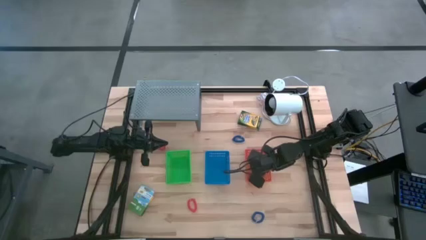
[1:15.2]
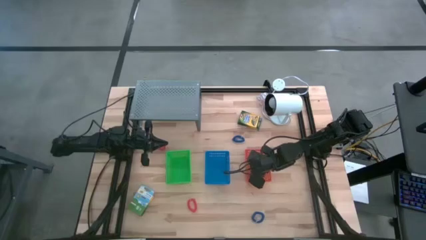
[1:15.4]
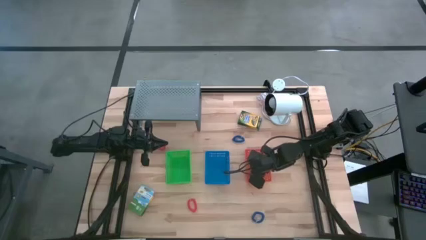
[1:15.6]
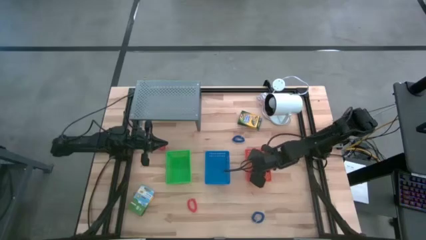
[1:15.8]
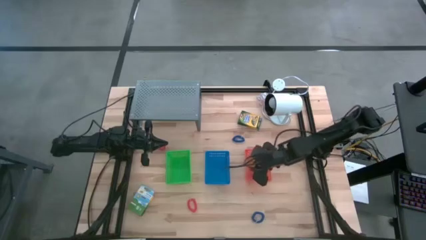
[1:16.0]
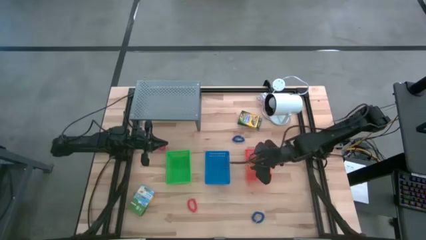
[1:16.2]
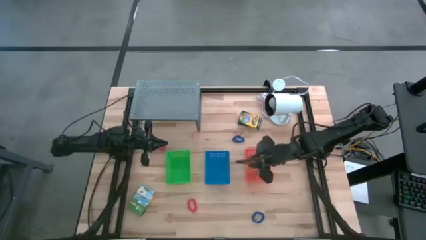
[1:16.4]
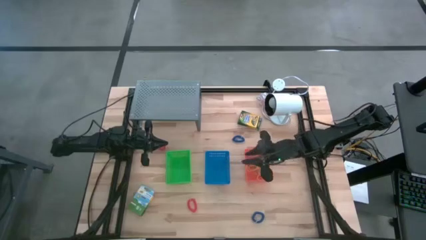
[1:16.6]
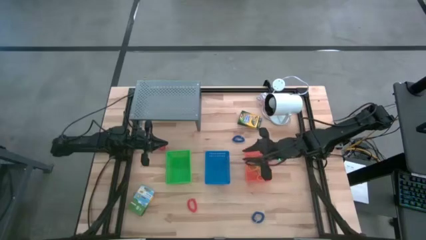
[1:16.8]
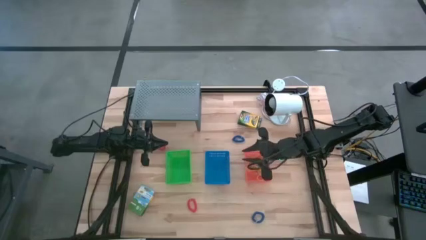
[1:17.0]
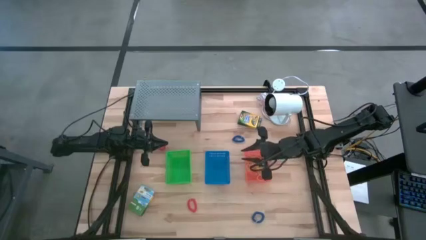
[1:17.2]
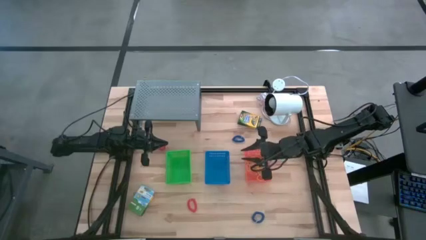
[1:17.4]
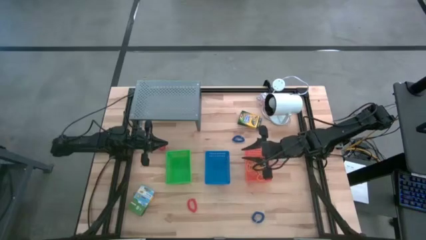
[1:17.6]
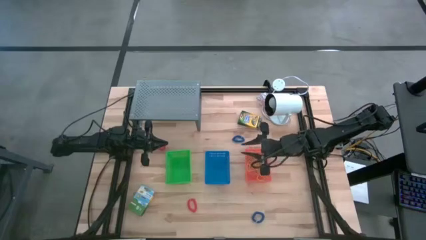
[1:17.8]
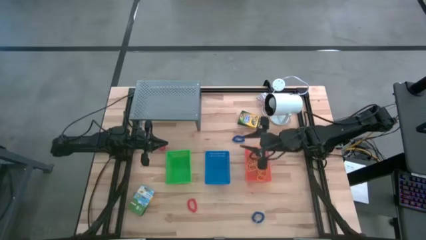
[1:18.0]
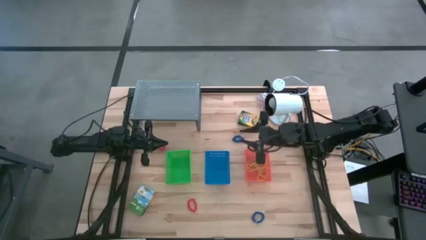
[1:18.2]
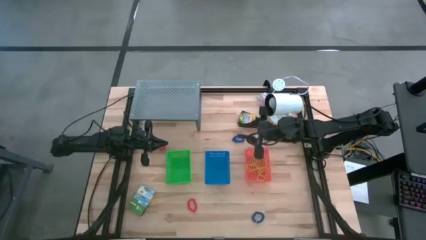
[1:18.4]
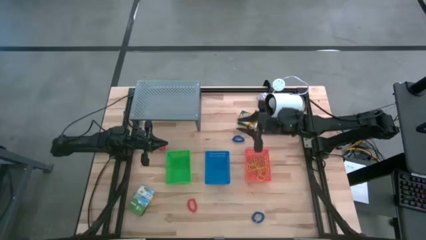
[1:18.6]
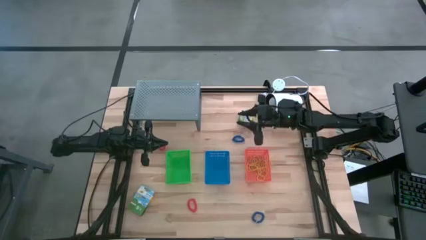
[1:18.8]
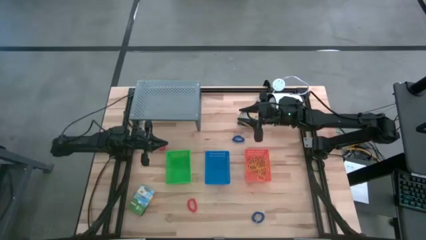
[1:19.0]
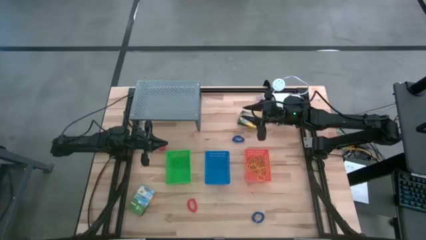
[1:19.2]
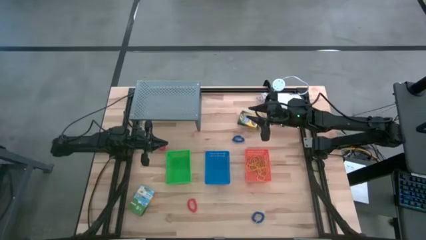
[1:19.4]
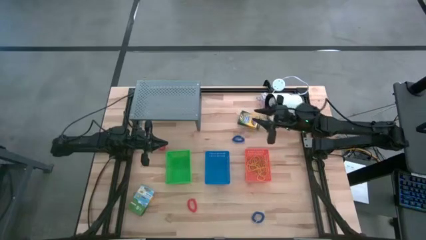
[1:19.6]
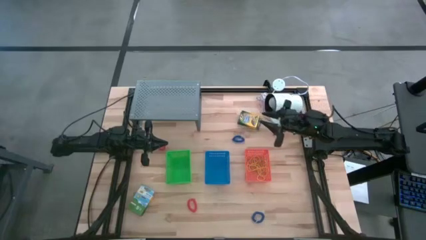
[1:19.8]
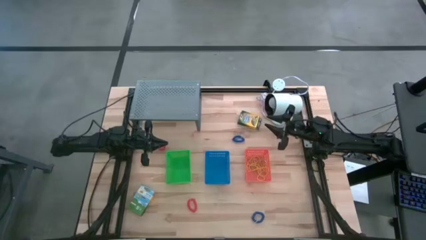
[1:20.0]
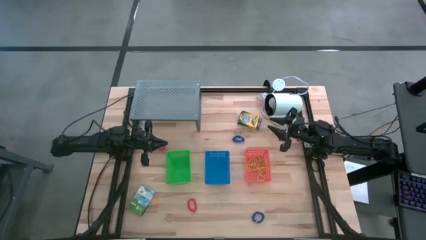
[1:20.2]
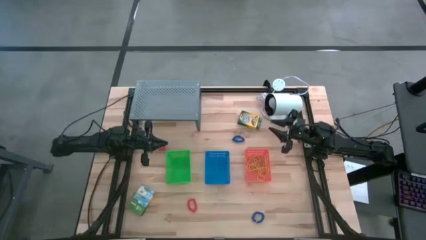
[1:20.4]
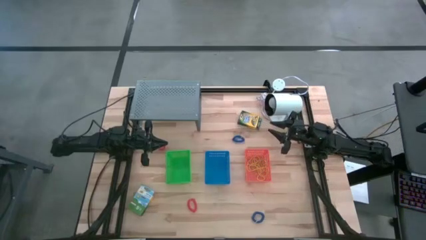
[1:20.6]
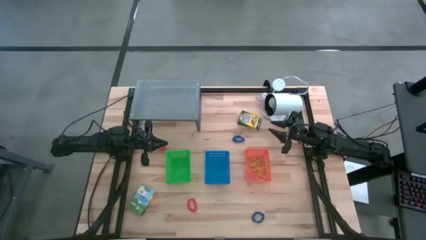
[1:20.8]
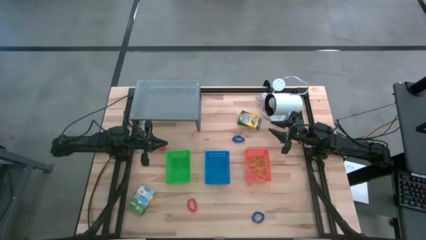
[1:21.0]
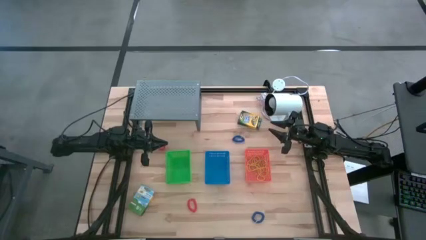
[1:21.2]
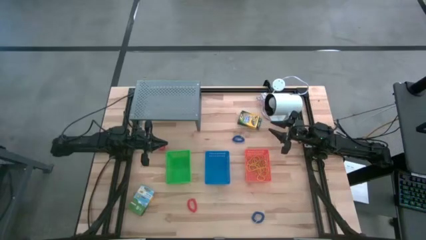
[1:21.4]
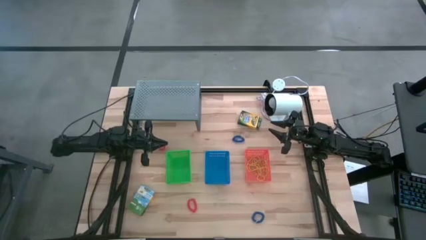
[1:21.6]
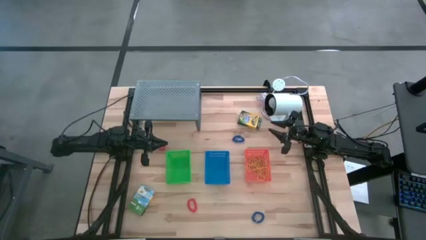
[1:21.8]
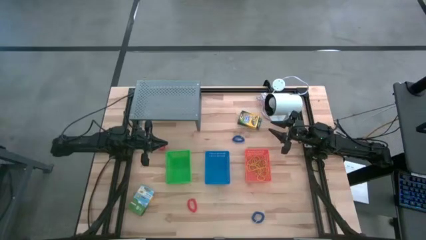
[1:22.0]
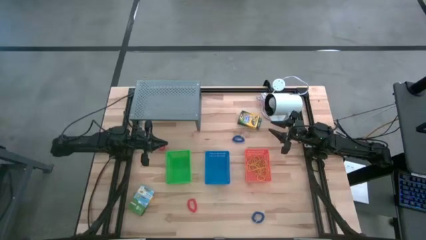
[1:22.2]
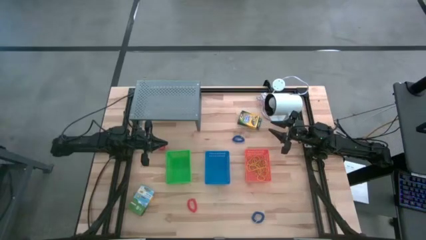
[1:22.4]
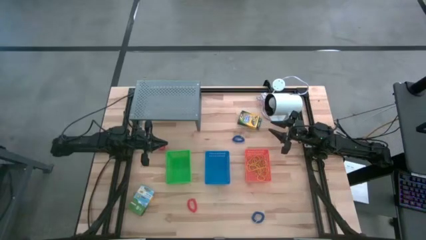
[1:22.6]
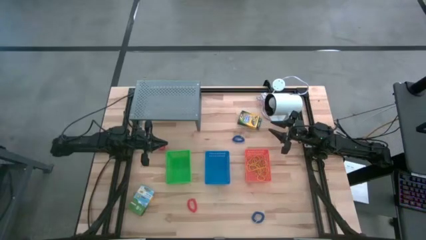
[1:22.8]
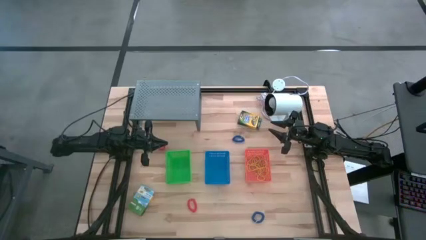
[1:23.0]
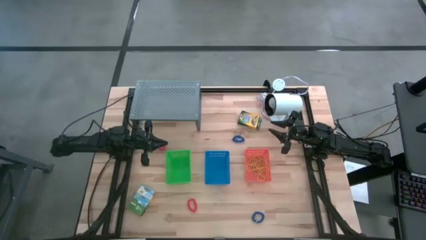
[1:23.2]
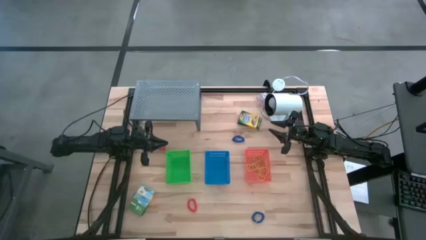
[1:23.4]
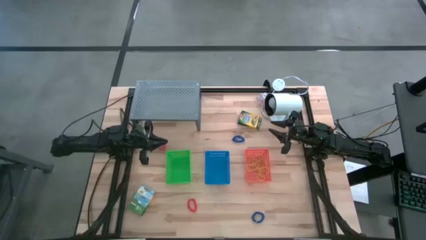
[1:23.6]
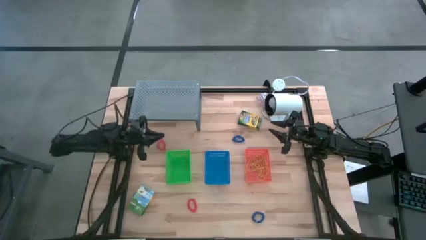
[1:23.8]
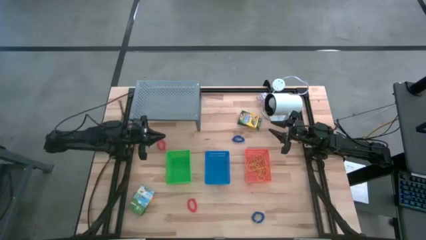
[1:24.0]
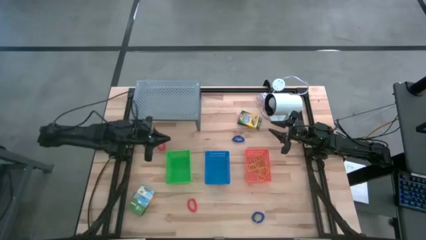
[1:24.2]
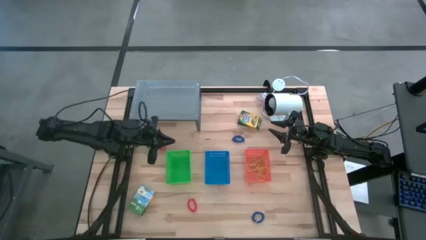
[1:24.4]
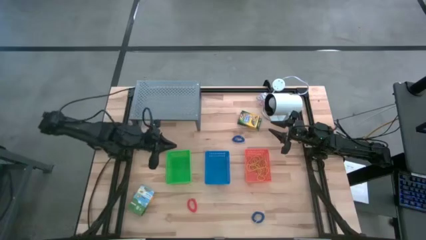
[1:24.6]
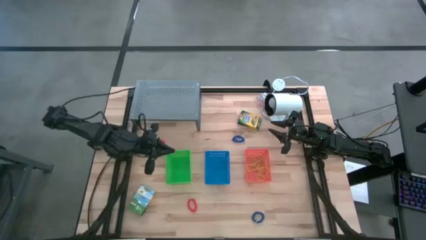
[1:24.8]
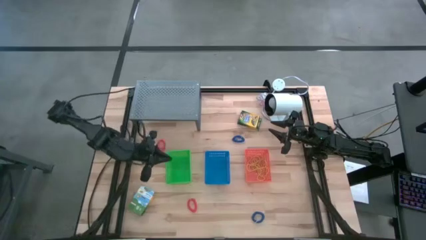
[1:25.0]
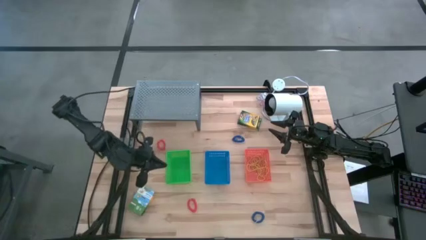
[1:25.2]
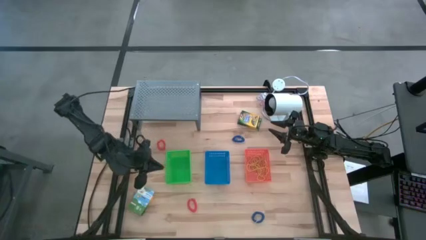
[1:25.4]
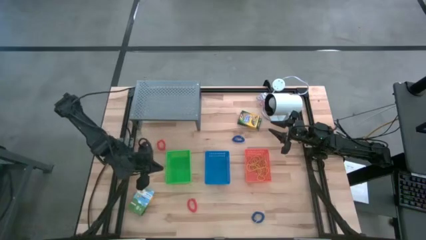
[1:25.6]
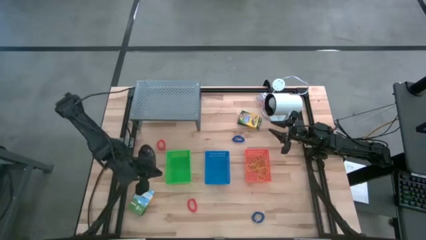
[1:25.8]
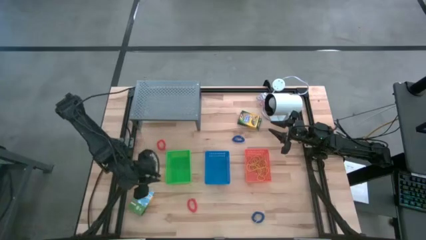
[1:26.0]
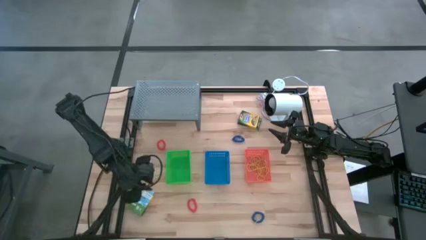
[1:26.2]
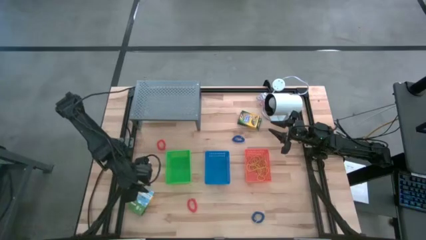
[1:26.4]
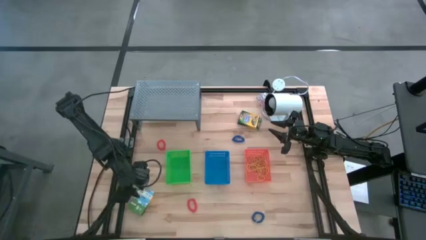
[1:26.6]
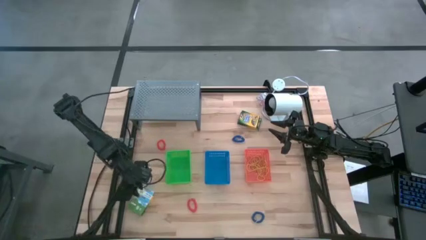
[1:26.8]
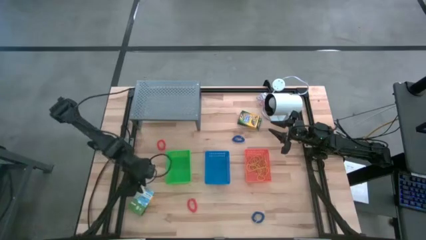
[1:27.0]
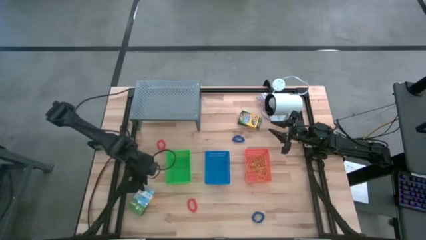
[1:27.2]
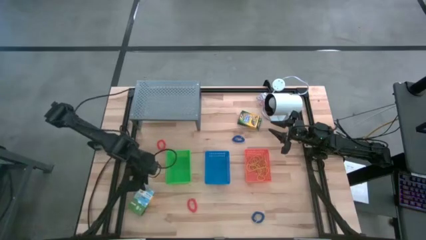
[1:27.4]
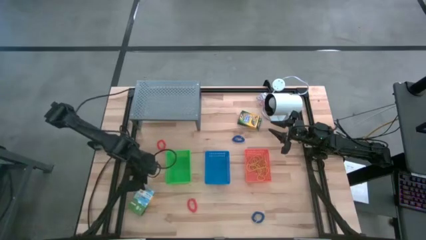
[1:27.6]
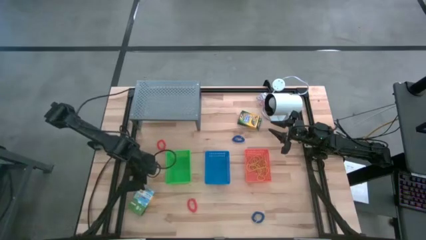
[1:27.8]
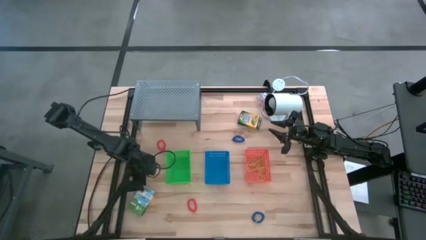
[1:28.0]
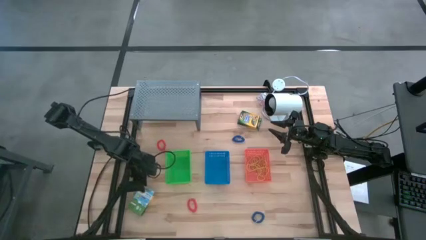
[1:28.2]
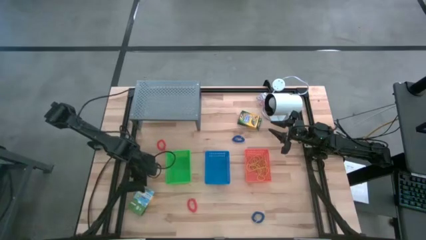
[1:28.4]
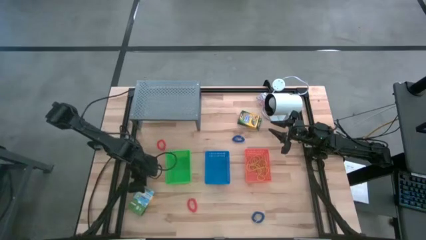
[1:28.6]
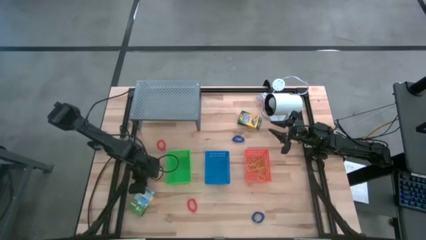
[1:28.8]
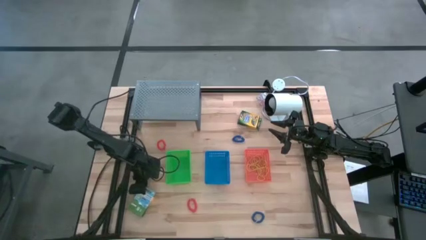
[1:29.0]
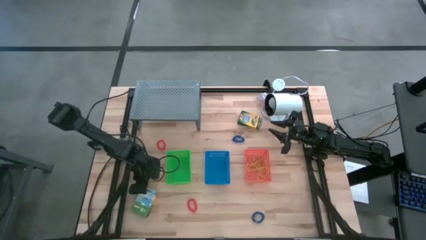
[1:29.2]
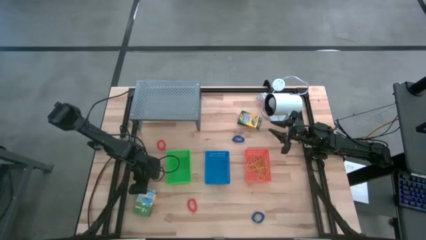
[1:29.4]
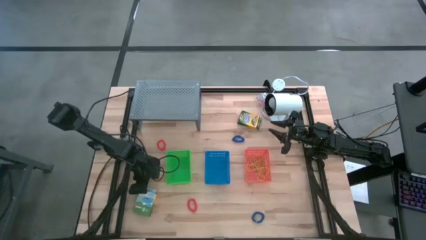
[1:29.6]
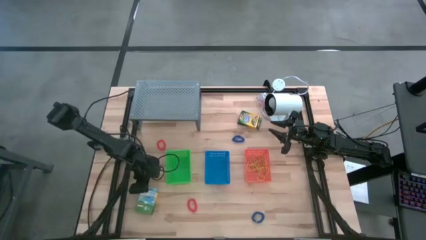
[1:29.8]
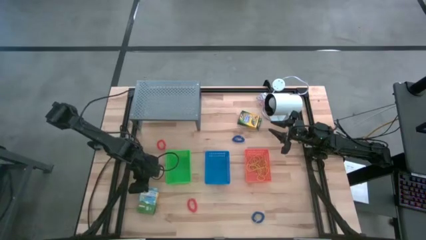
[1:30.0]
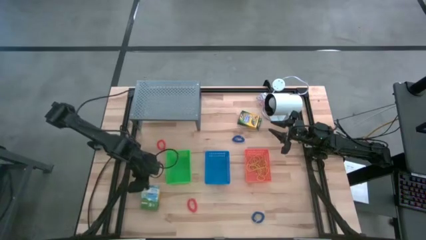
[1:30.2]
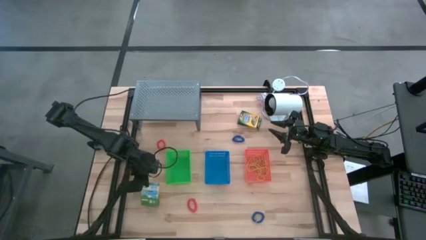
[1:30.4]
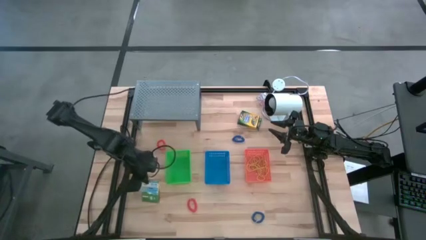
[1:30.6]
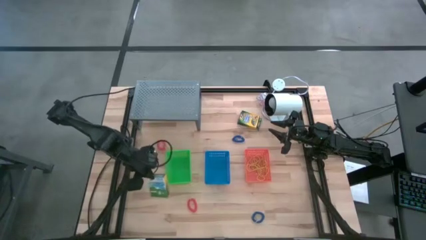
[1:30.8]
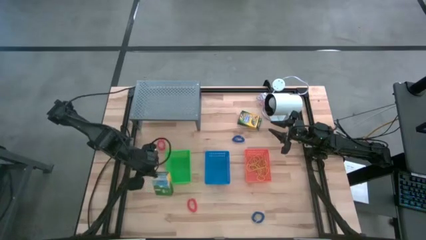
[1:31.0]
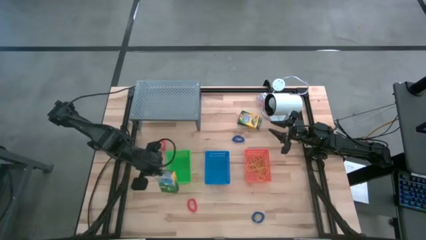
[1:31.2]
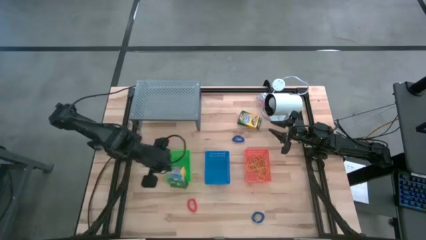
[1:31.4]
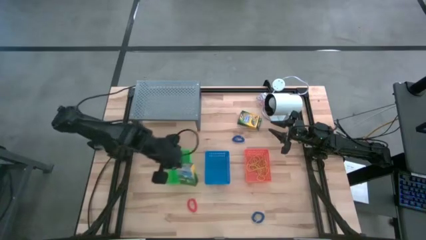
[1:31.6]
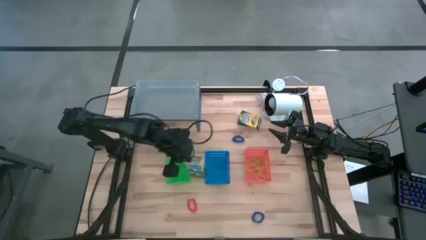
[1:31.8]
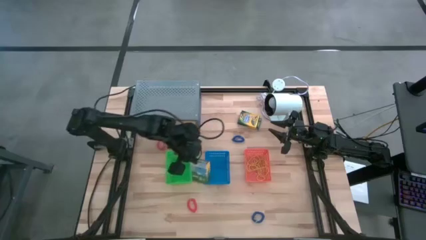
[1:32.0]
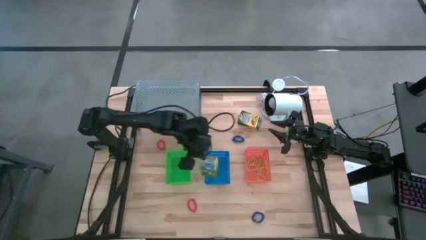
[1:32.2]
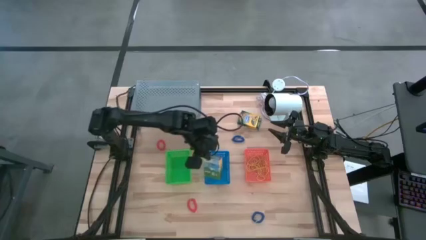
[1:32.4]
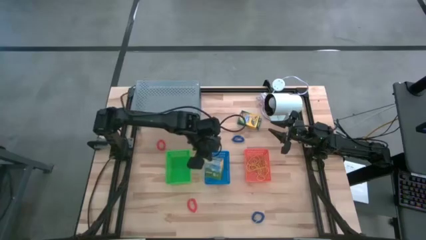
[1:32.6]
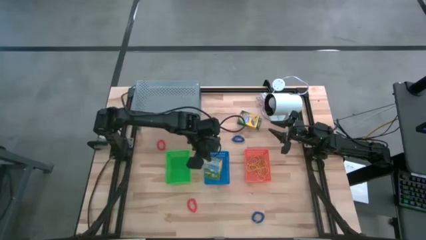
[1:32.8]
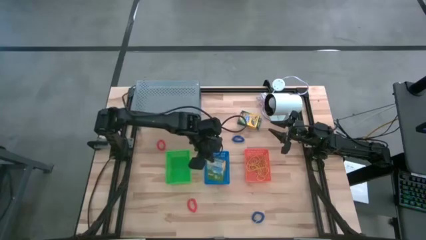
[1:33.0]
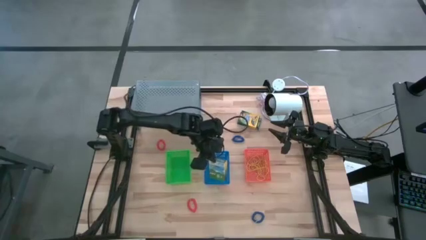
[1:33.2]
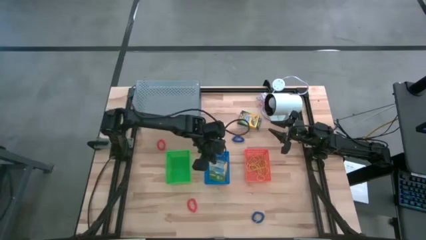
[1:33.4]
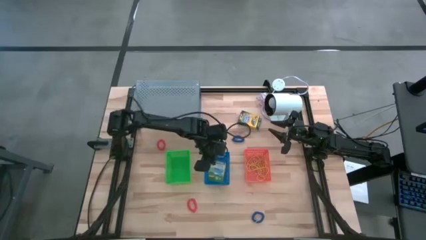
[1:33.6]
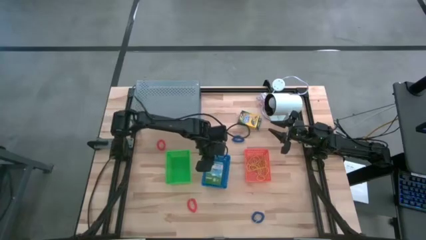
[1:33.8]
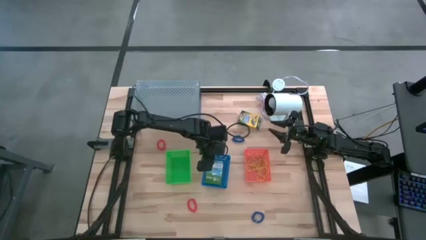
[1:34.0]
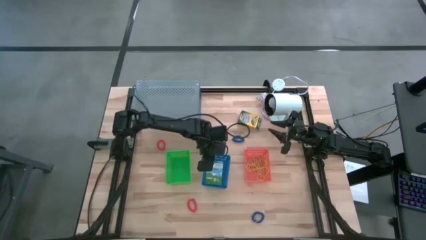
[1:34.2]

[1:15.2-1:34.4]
Task: Pick & Place Office Desk Supplies
Put the crayon box into the blue bin
